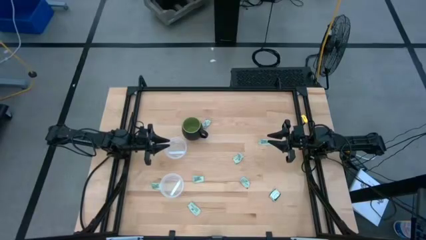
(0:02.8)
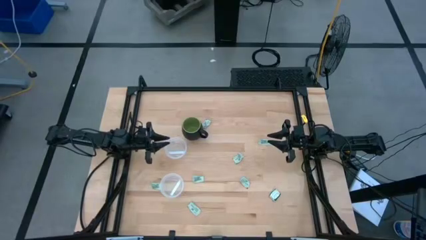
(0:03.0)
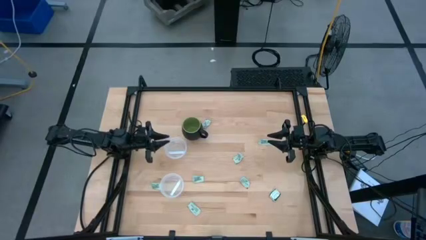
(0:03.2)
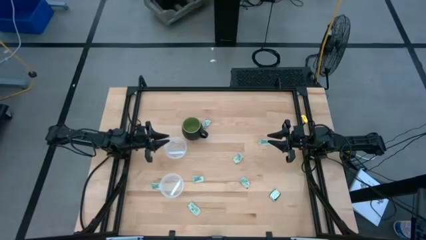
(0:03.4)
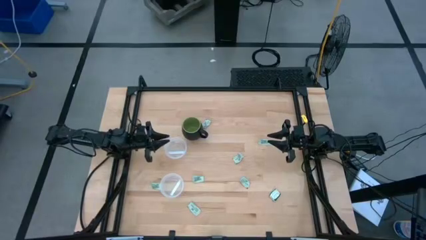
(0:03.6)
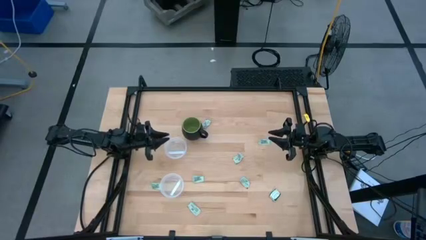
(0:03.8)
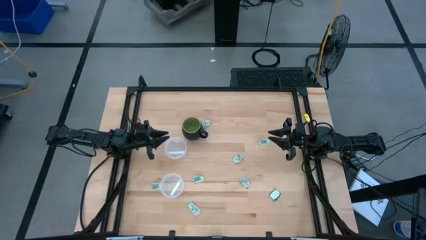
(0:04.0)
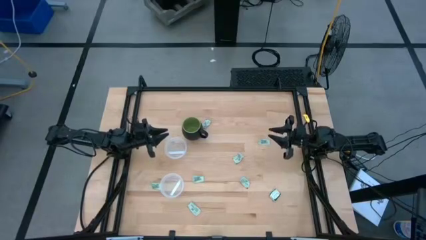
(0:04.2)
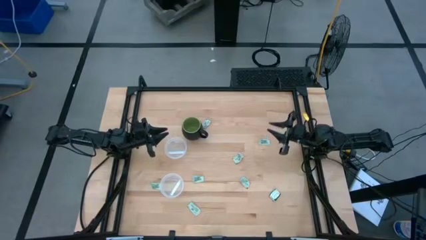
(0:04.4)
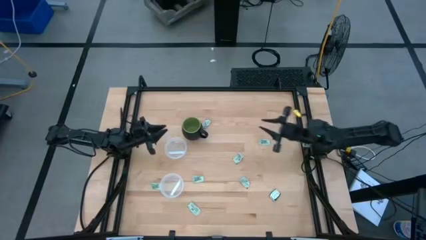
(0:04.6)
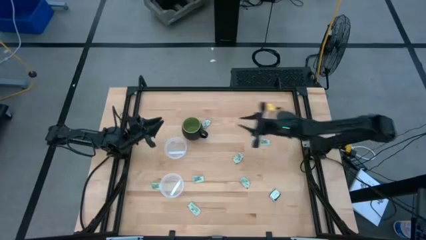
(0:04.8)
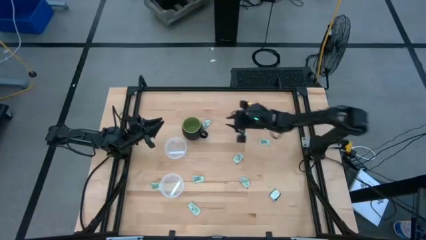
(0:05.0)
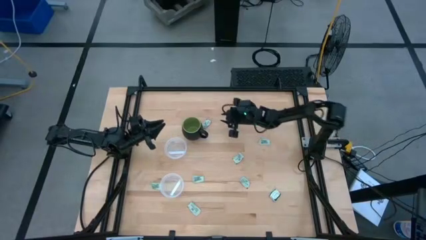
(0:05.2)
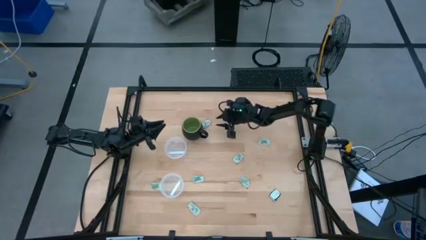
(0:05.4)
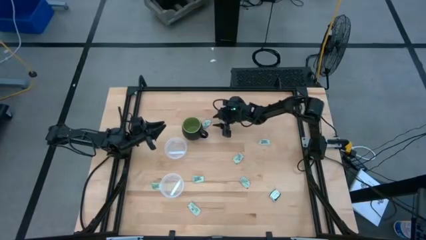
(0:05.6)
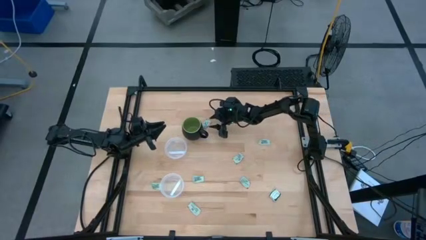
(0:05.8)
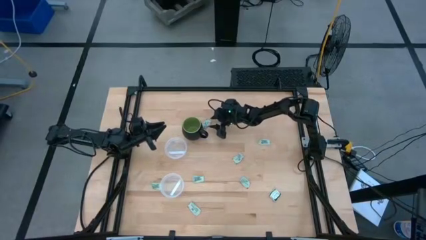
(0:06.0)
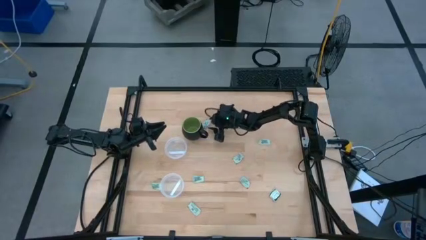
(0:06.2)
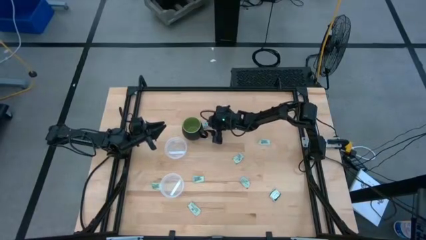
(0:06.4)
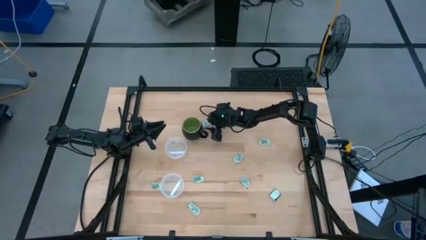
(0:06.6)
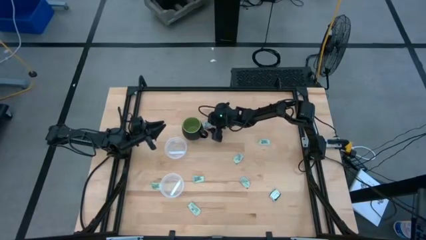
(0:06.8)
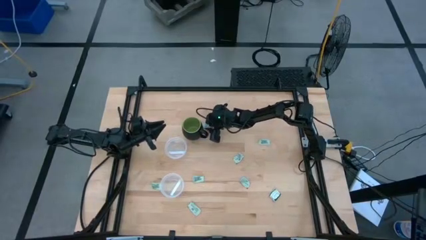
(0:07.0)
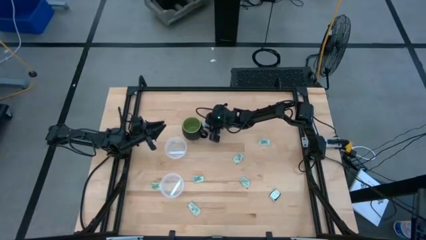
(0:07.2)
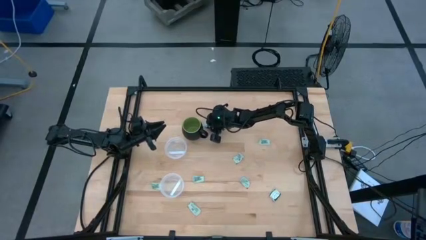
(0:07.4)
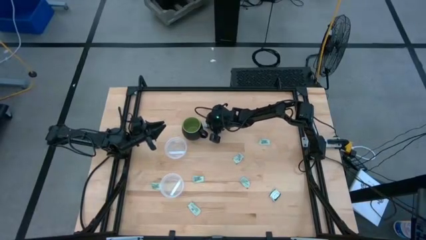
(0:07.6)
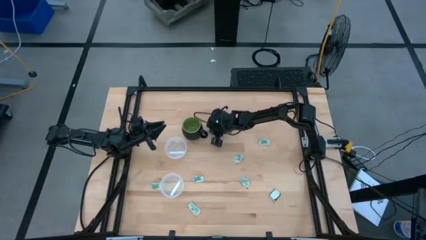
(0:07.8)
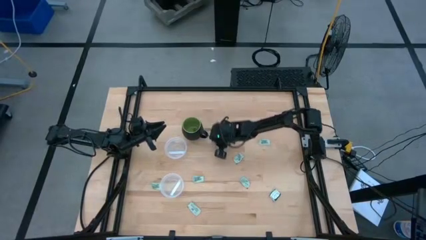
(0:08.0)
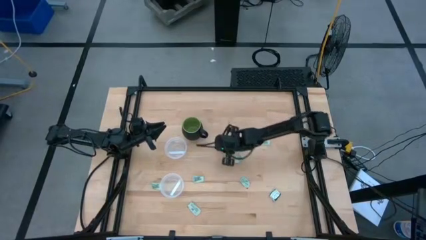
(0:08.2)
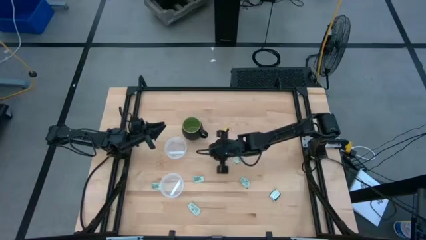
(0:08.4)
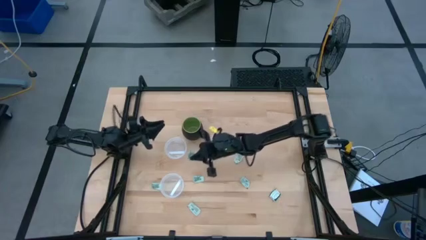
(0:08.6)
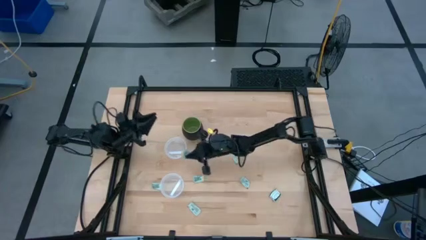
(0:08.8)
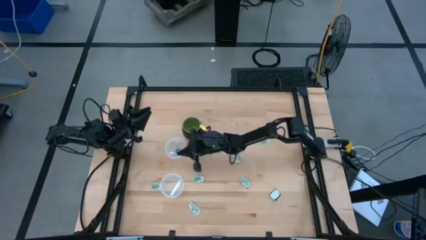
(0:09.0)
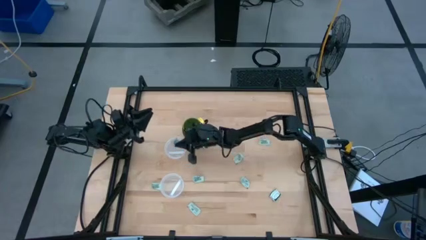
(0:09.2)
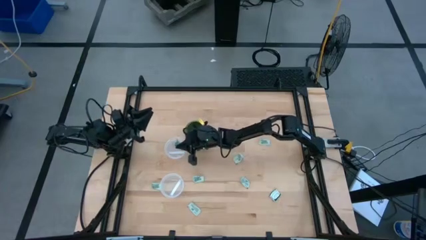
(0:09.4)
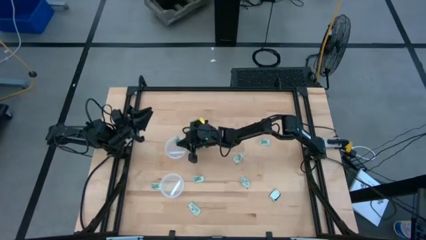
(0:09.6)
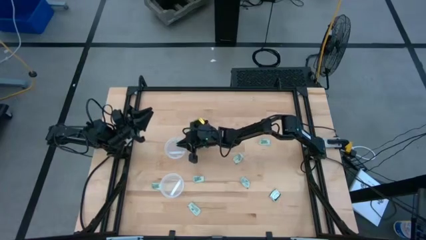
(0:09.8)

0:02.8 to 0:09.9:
Task: Pick and place Stevia / Truvia into bins
Put the green stevia packet into the top transparent container

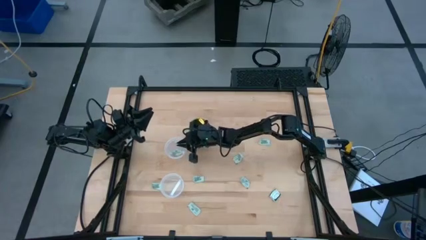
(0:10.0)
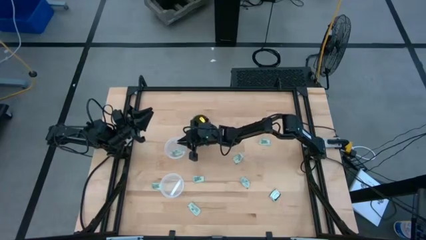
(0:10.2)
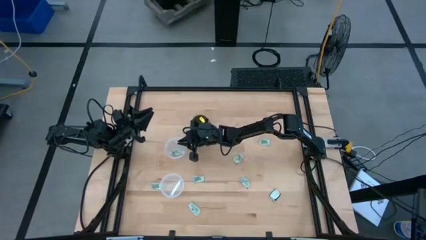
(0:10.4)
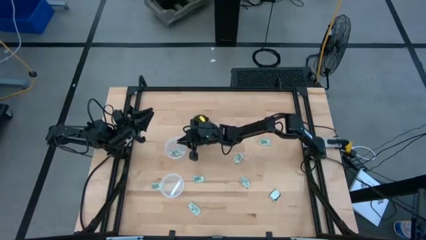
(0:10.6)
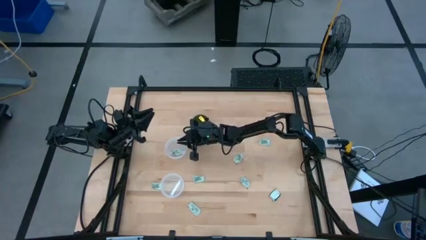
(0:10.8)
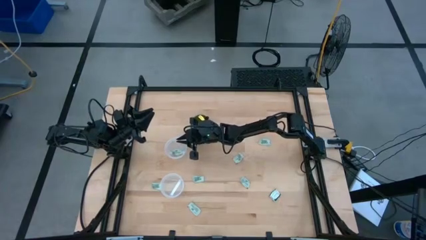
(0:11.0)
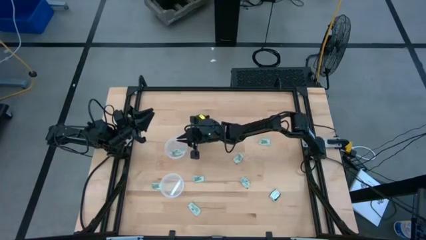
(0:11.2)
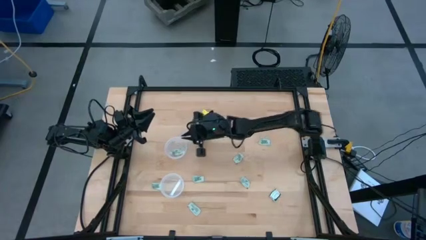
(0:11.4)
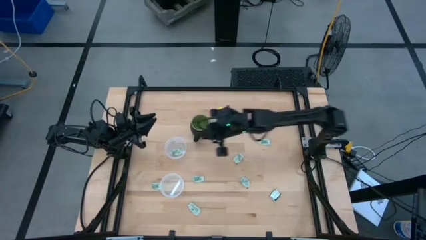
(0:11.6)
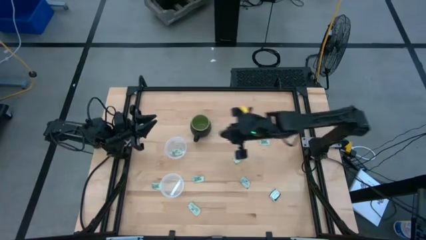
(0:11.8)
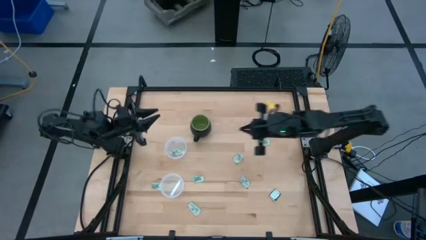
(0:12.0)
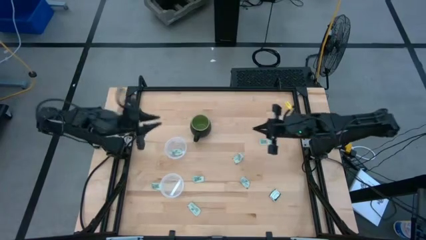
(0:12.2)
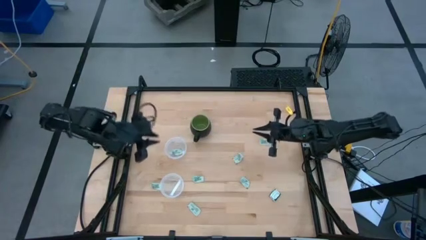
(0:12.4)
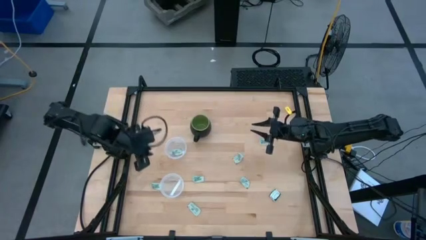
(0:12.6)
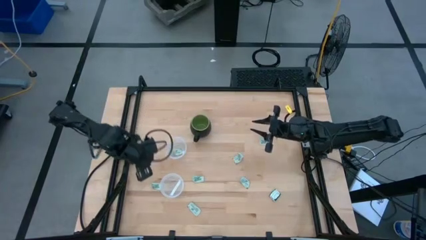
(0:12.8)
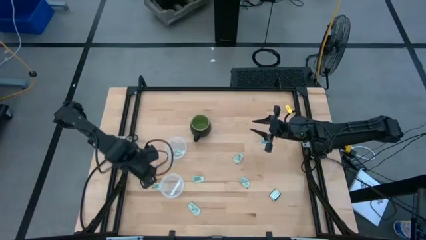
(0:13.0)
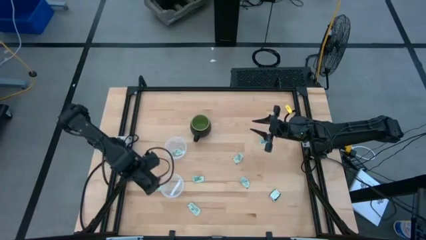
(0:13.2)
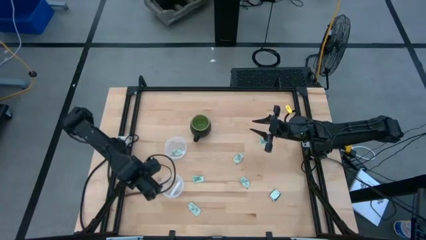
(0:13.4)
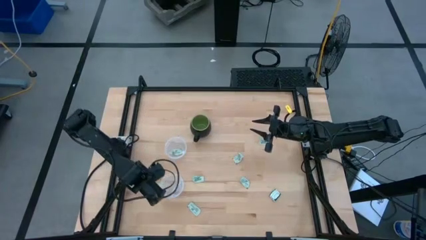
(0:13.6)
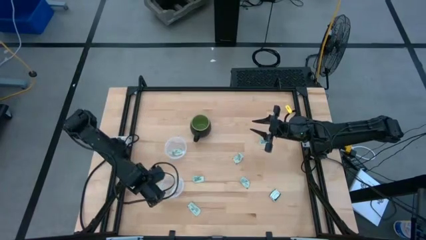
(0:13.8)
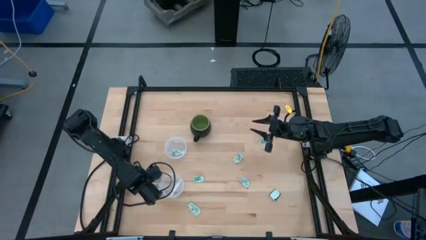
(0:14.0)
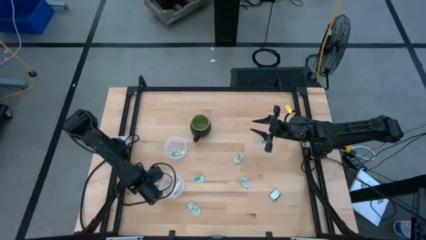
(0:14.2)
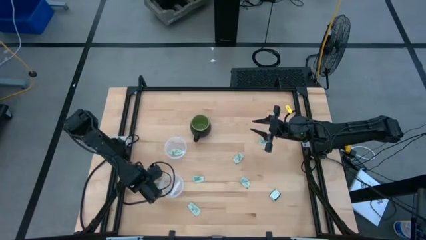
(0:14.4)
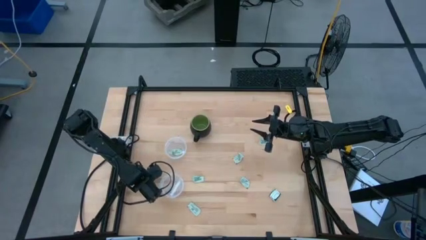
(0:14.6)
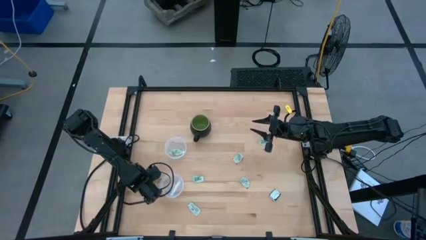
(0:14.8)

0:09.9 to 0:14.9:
Put the green stevia packet into the bottom transparent container

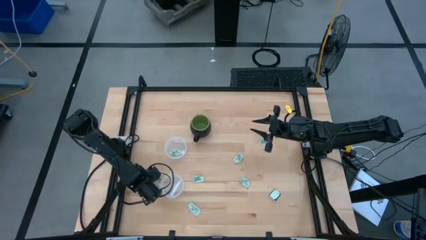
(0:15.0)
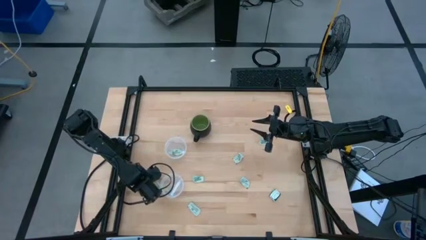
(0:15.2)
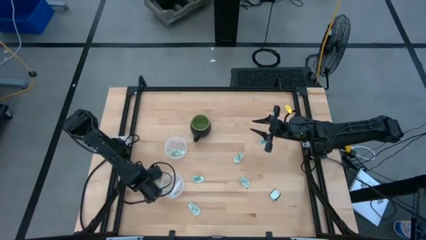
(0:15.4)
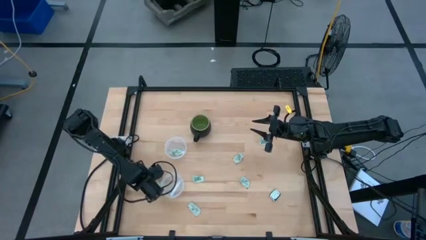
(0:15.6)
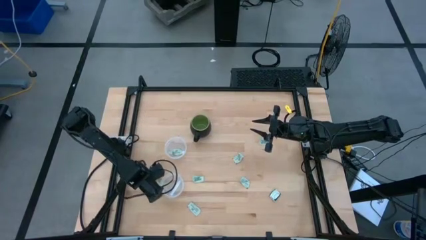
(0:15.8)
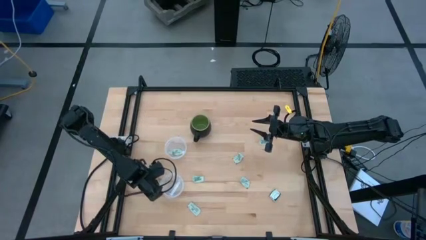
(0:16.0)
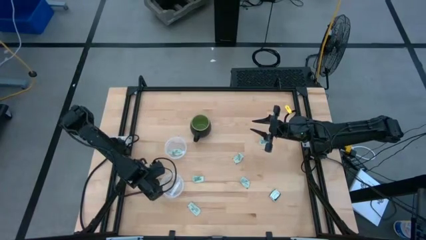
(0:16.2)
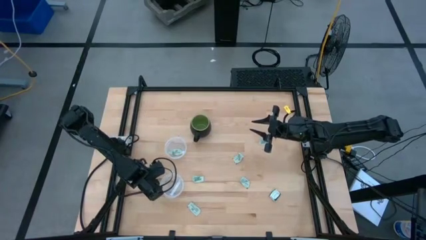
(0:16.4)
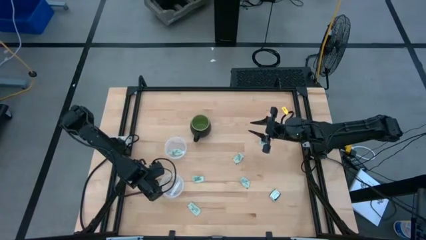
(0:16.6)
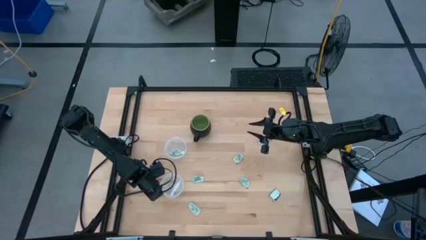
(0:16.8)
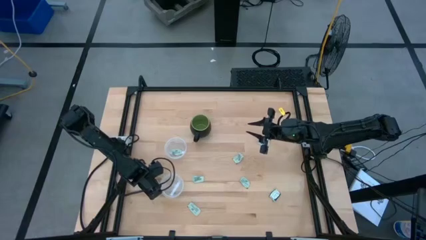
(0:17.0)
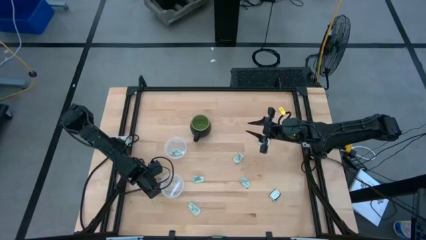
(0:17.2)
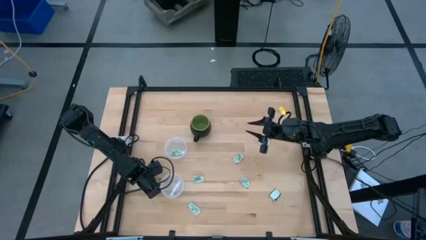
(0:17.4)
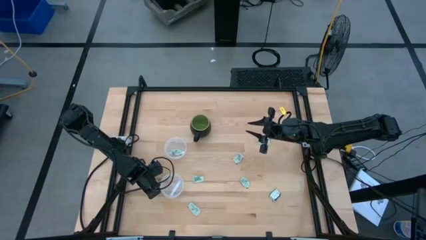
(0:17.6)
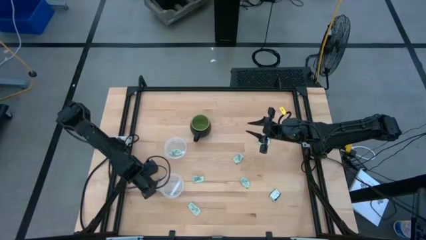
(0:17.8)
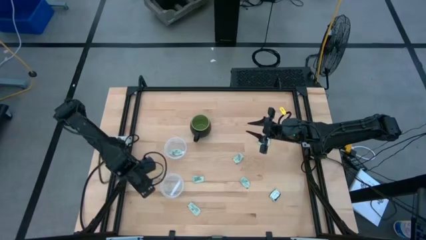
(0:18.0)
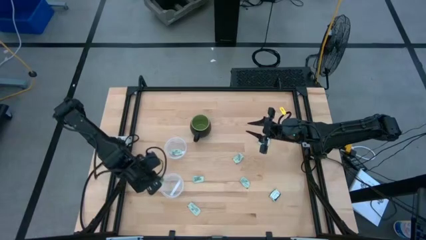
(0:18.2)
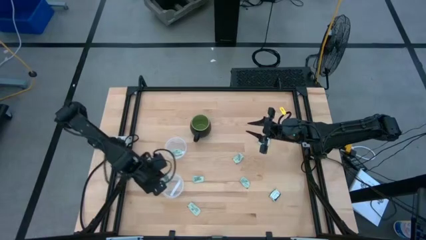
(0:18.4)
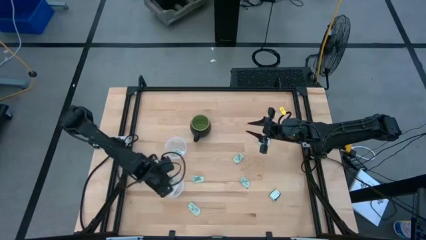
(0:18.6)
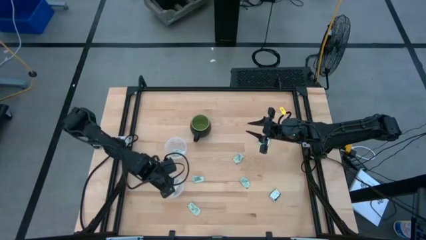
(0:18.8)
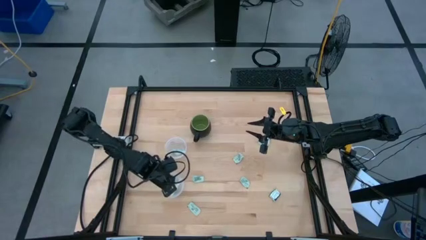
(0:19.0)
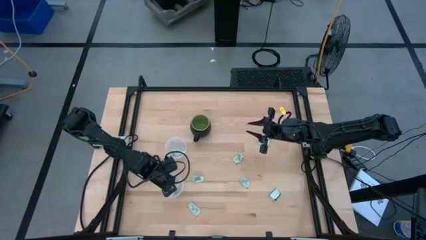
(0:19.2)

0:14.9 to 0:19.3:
Put the green stevia packet into the bottom transparent container
